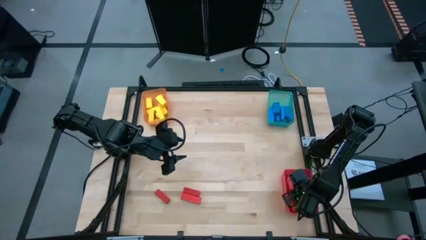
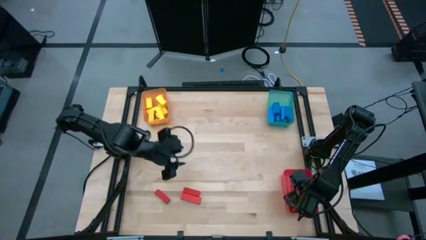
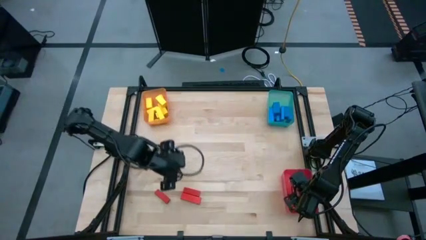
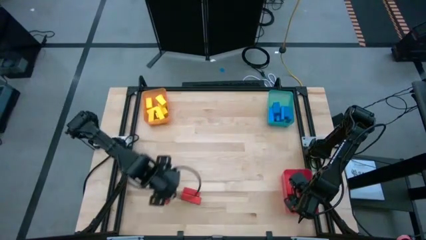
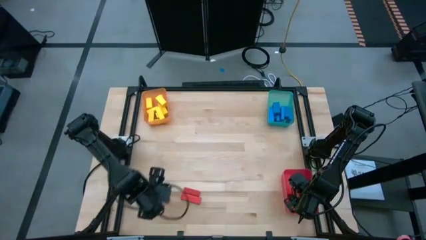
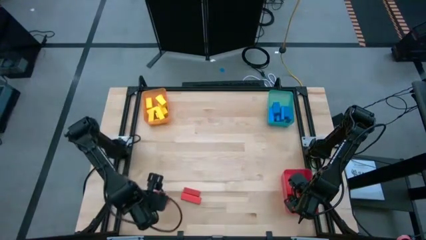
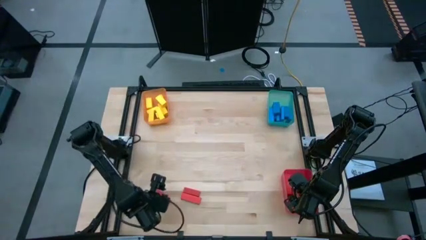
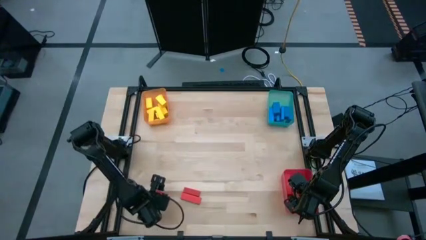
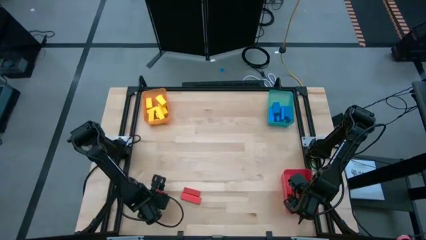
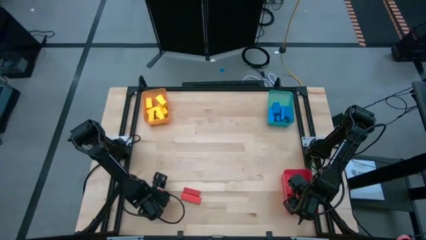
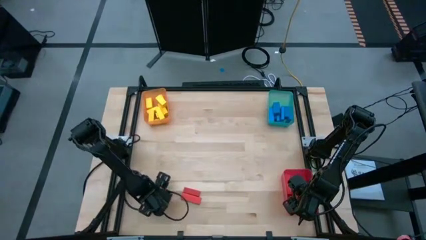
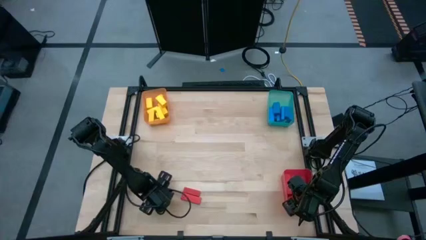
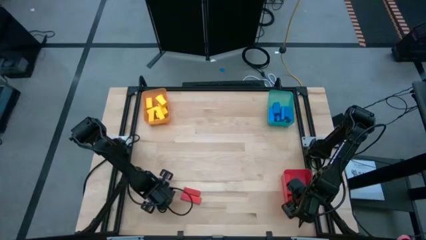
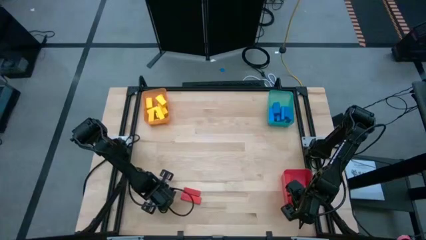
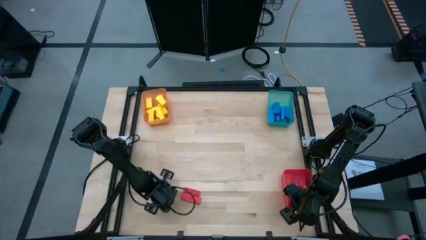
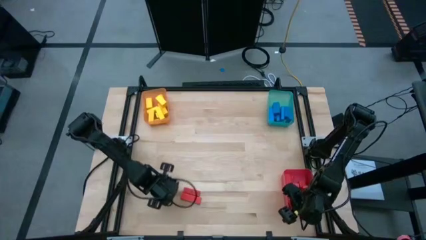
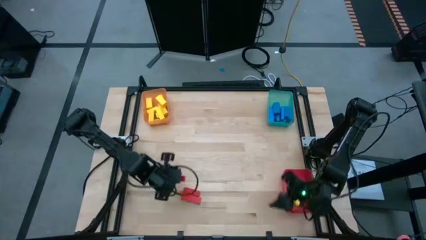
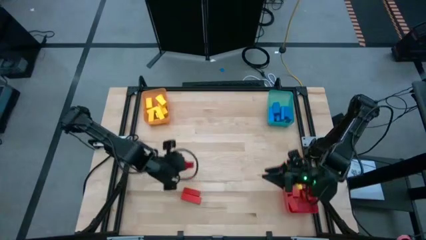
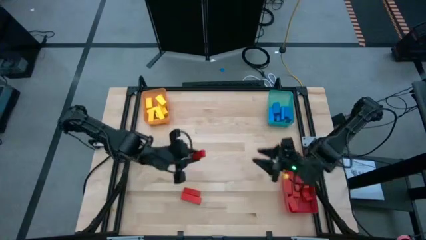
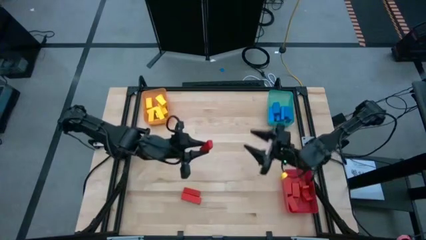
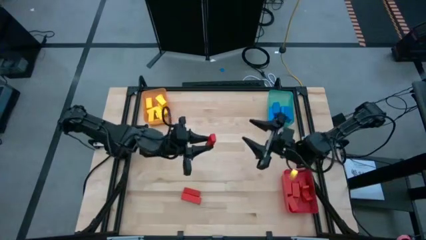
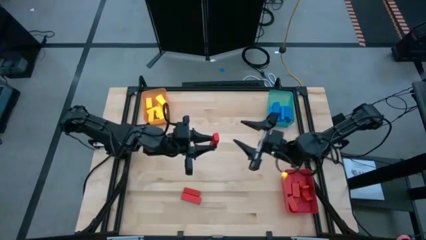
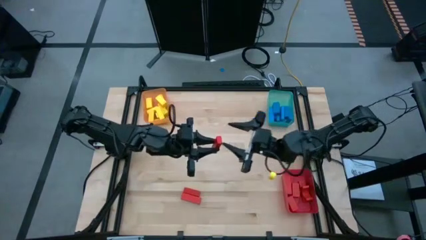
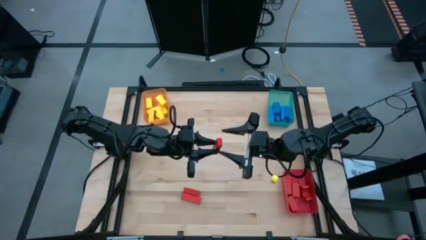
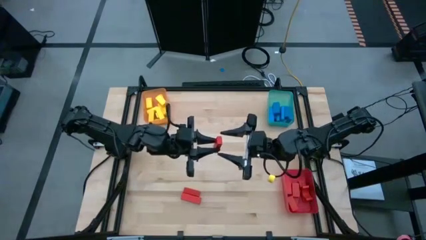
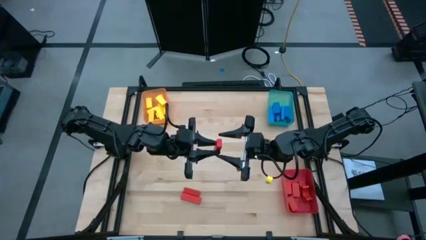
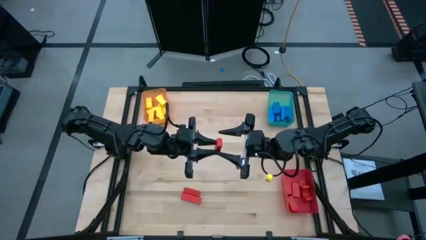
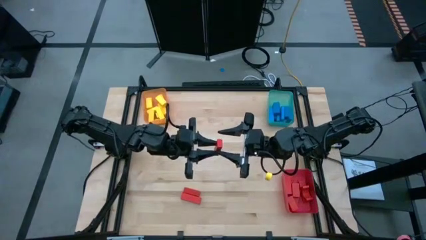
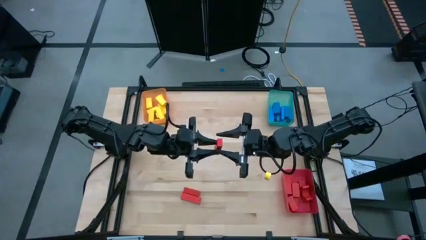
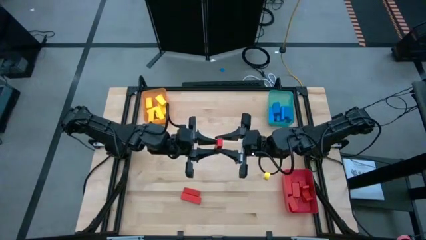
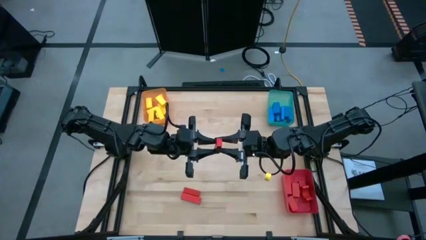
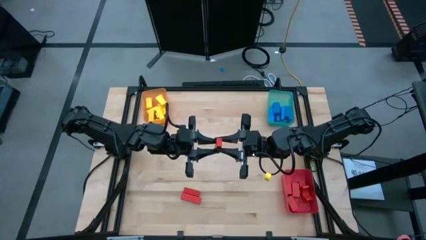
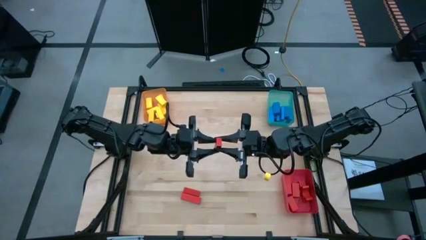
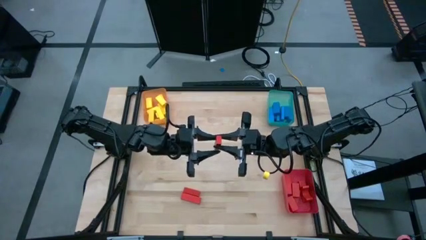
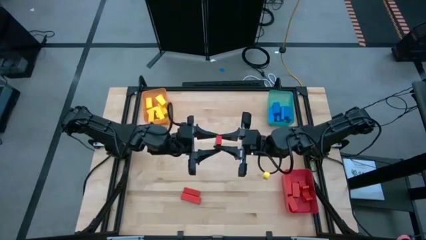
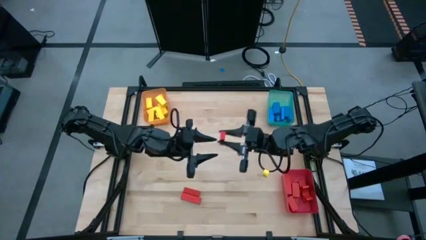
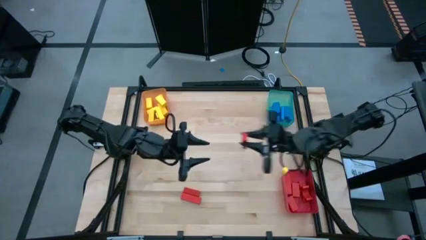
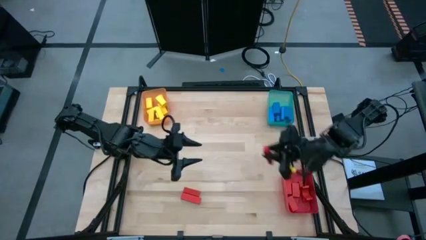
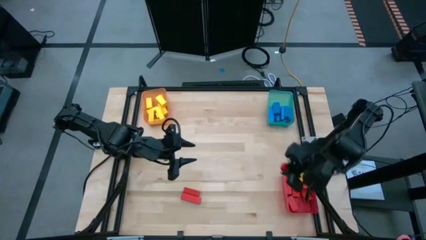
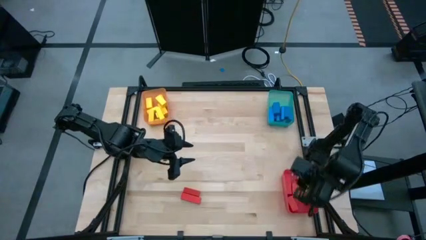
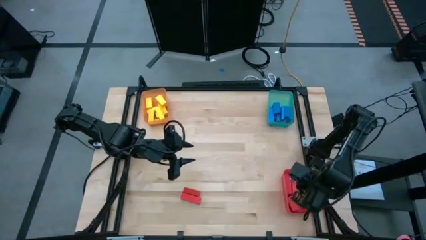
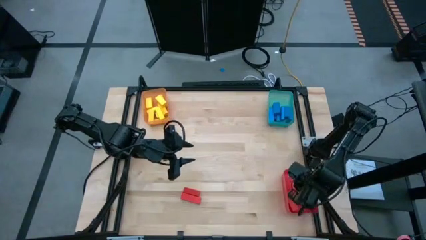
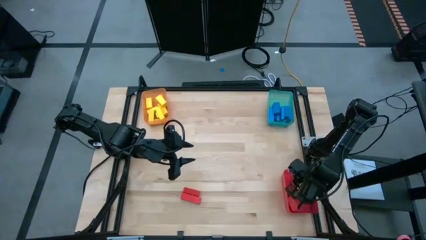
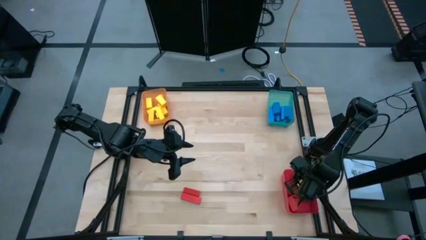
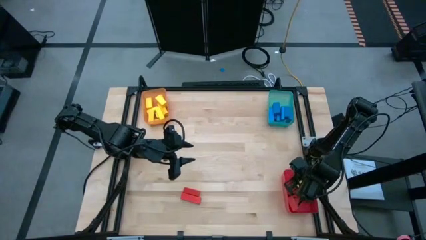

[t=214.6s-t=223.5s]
Task: Sort blocks
Put the red block into the red bin
